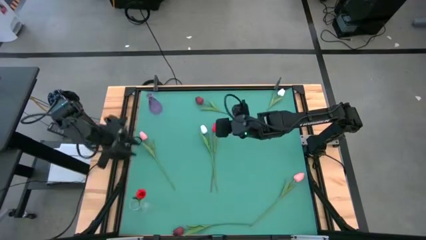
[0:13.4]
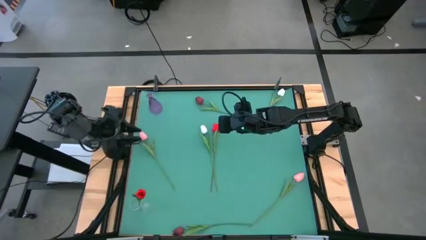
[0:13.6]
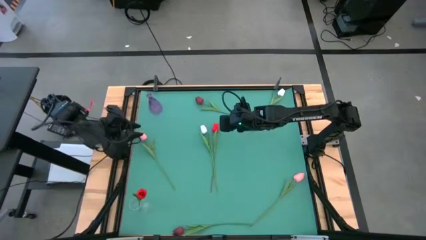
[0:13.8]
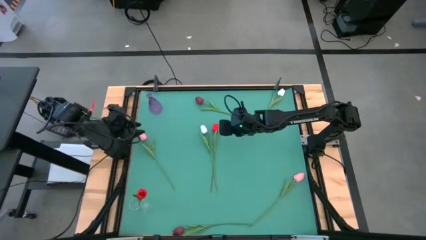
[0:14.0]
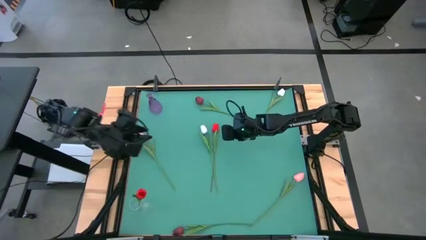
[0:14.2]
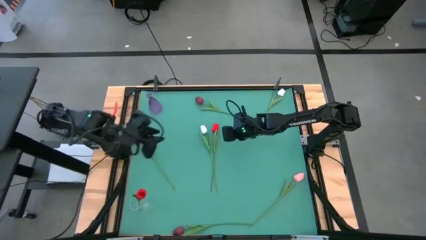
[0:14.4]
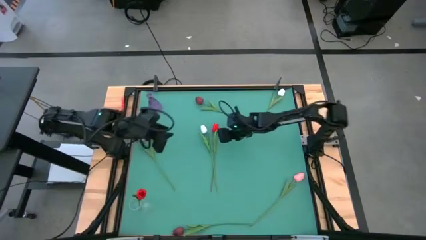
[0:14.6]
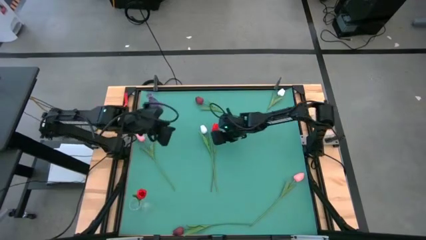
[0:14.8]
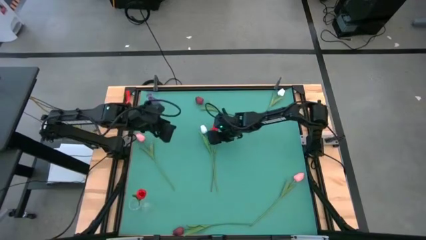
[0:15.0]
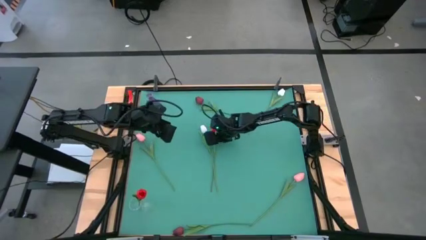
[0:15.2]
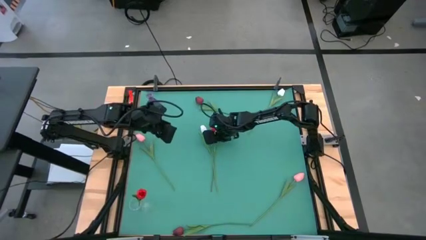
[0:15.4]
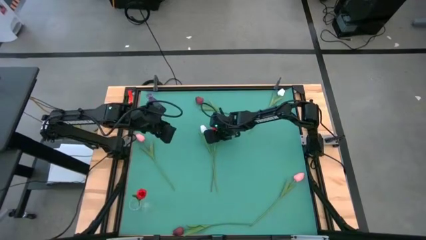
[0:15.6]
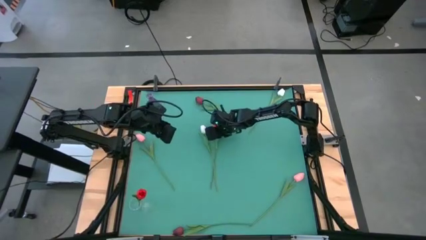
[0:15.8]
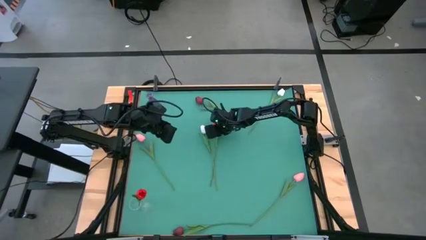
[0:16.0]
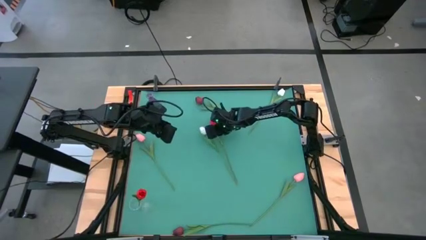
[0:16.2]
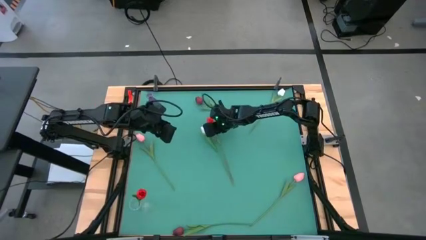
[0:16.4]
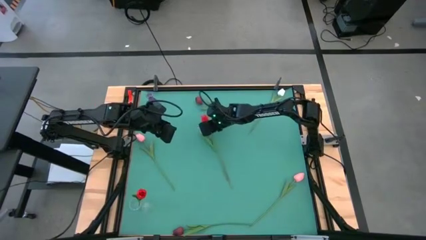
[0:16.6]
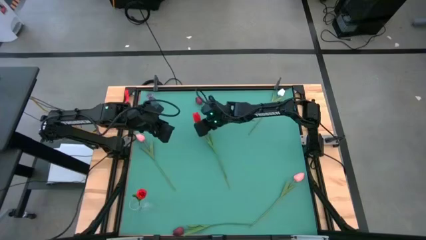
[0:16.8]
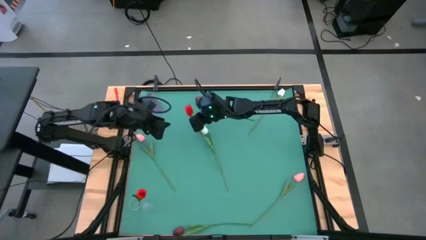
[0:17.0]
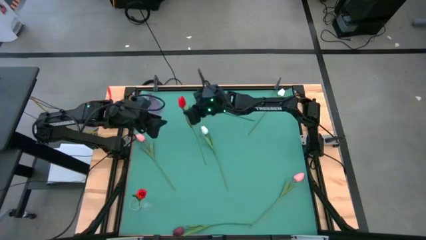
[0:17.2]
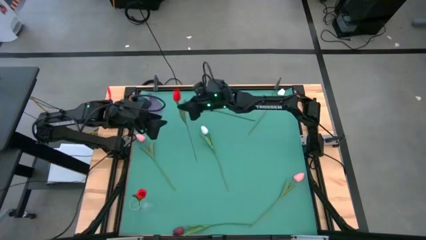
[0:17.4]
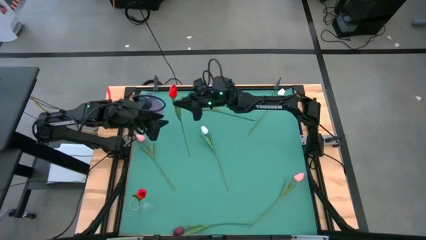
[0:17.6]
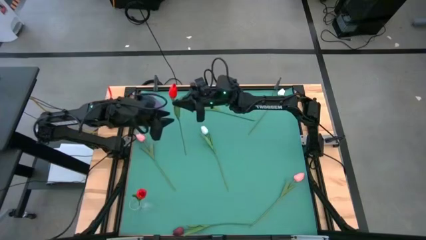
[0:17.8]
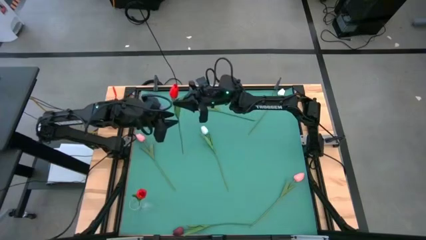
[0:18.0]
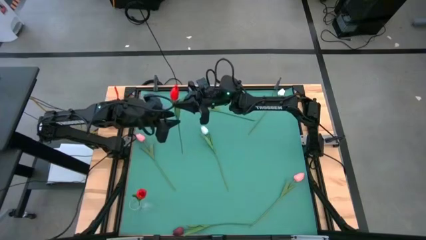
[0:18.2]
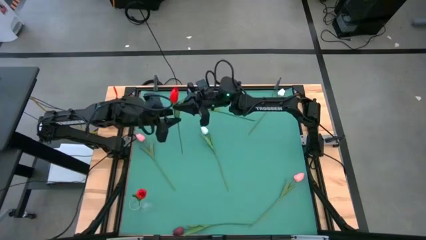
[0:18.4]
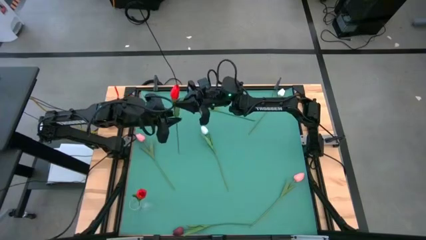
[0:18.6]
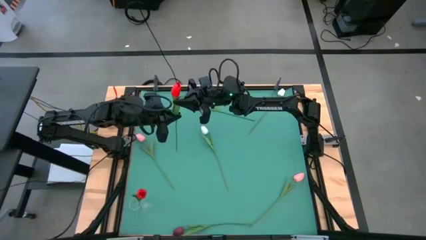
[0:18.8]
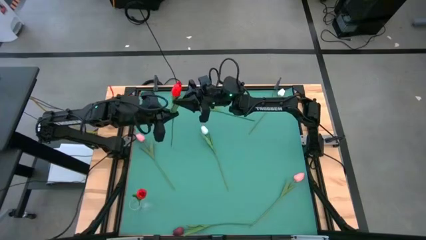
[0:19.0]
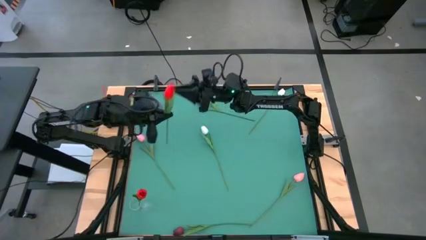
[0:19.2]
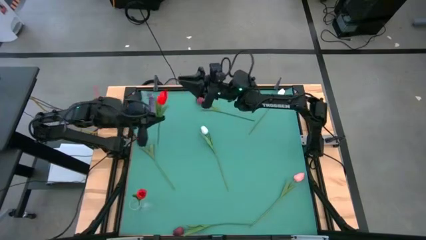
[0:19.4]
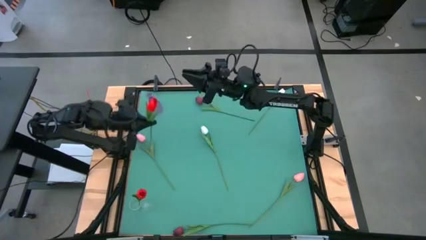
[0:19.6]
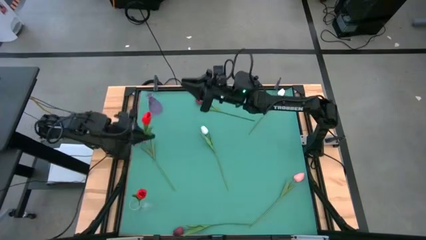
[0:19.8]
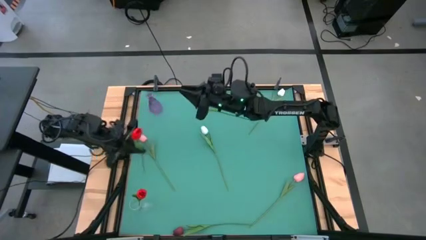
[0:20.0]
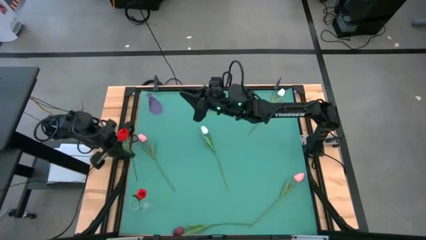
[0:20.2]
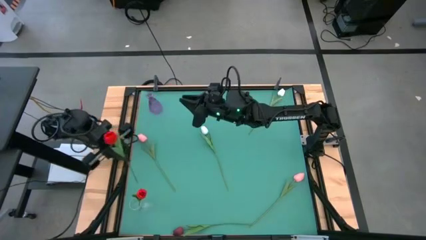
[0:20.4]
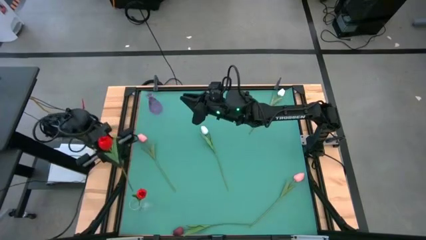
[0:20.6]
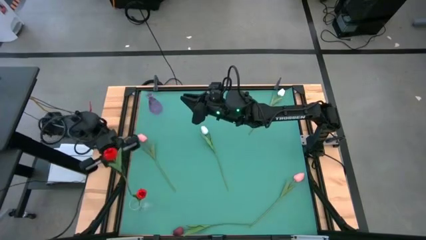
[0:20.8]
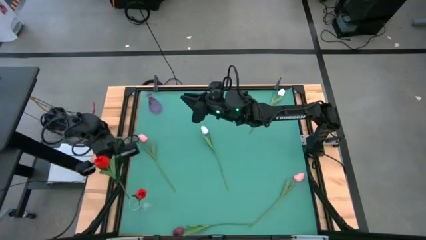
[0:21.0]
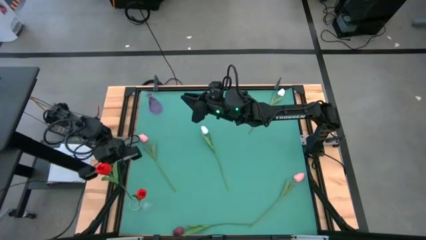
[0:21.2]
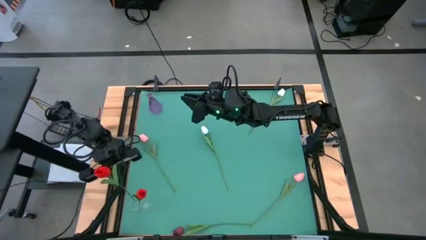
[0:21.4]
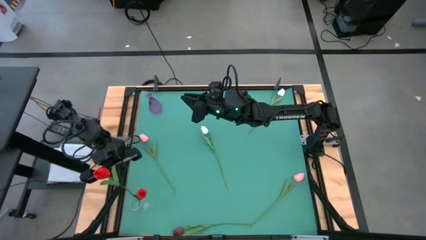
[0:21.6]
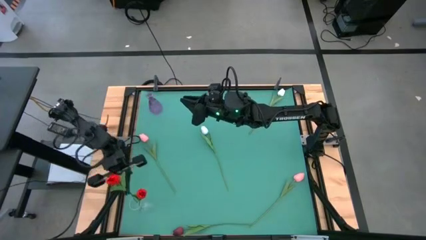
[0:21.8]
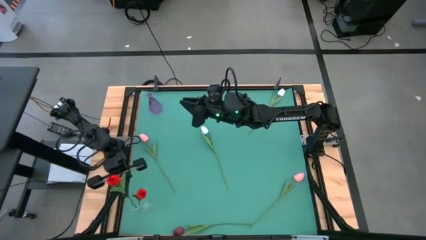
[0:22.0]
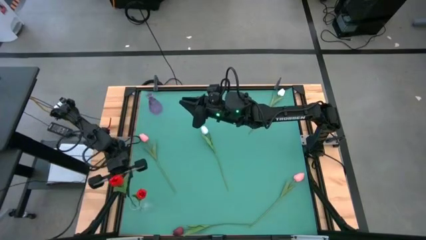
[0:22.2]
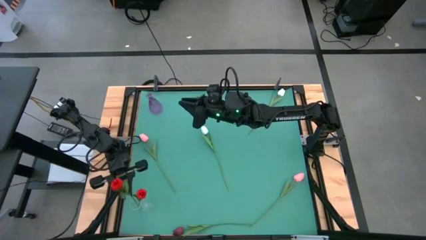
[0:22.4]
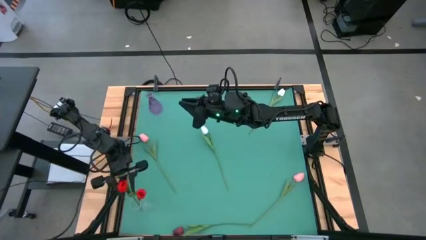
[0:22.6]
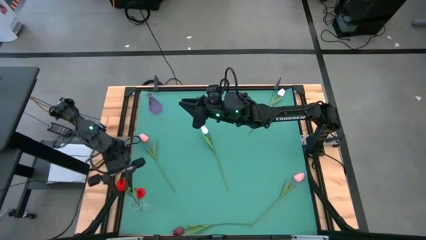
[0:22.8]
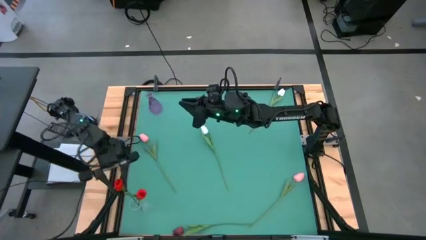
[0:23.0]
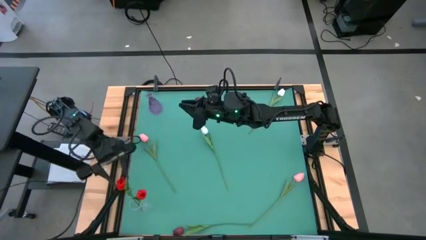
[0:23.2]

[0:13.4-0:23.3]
Task: Sort flowers into vase by color
Put the red flower into the transparent vase

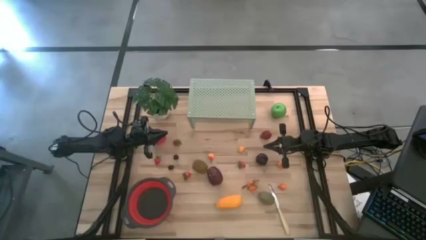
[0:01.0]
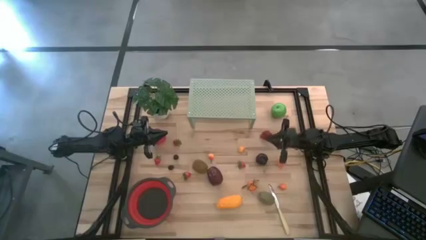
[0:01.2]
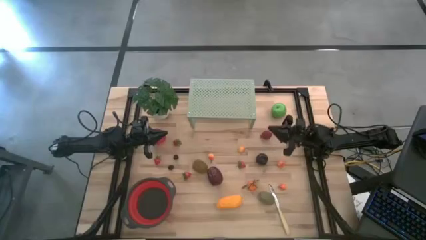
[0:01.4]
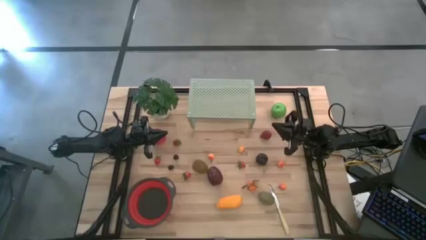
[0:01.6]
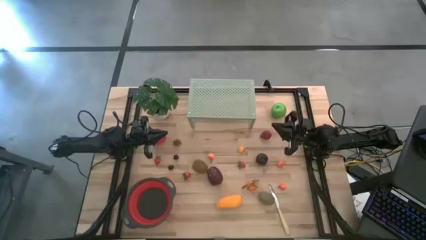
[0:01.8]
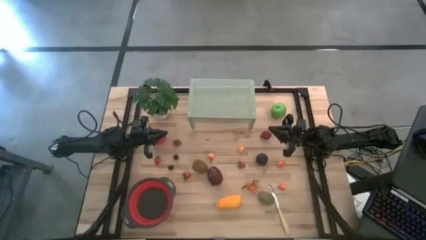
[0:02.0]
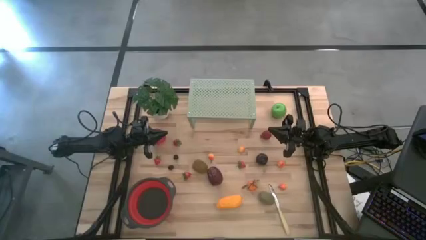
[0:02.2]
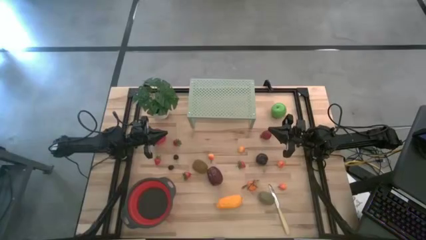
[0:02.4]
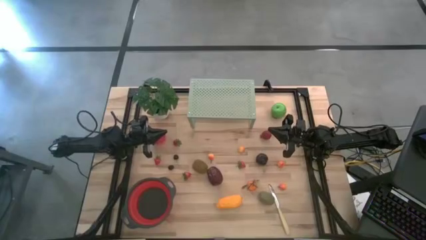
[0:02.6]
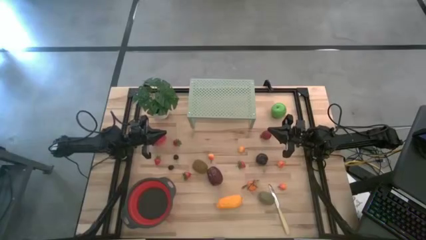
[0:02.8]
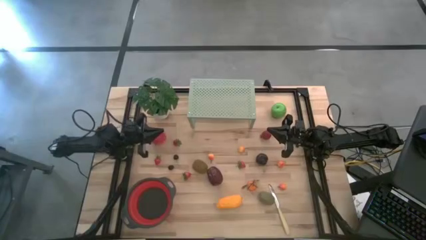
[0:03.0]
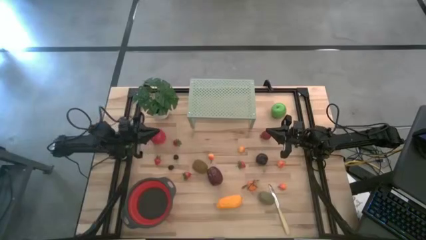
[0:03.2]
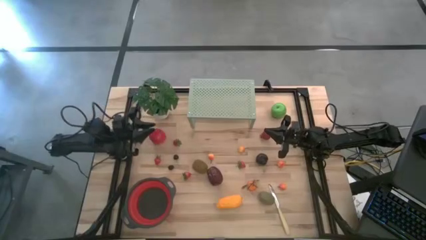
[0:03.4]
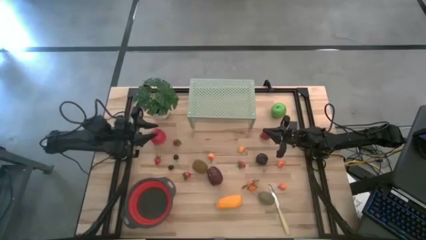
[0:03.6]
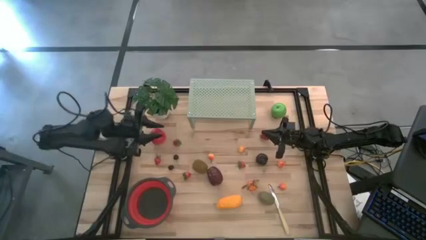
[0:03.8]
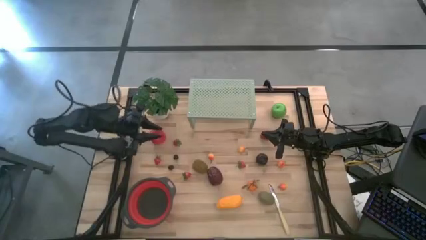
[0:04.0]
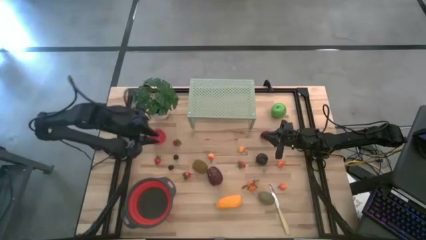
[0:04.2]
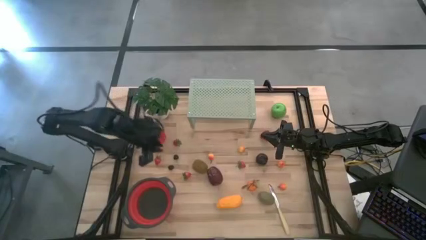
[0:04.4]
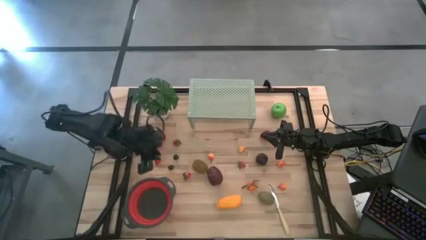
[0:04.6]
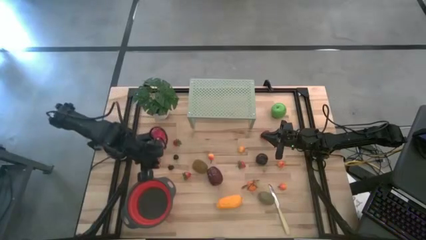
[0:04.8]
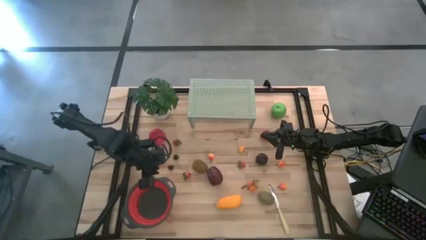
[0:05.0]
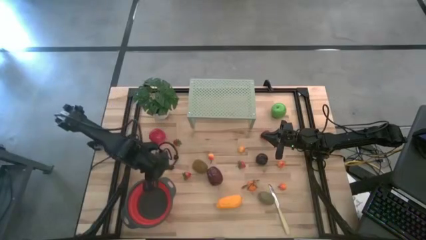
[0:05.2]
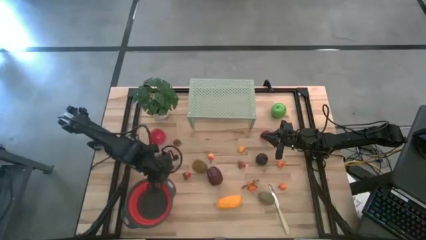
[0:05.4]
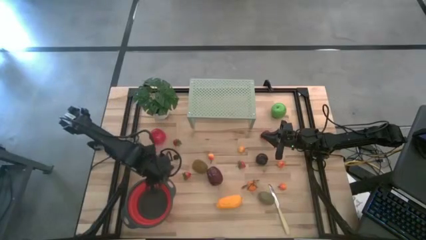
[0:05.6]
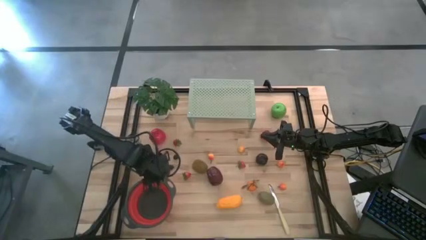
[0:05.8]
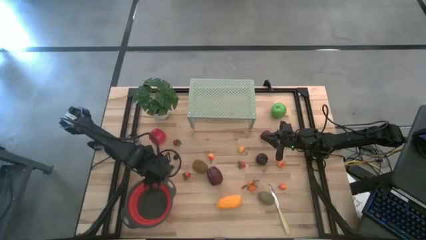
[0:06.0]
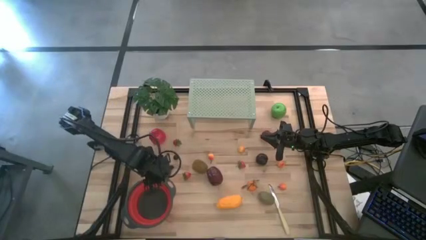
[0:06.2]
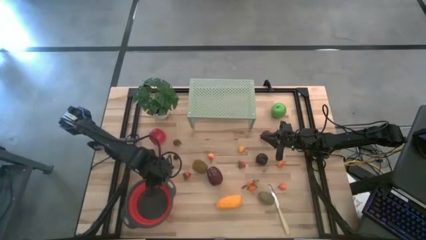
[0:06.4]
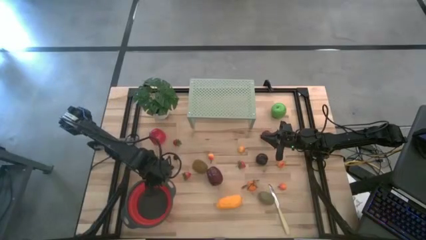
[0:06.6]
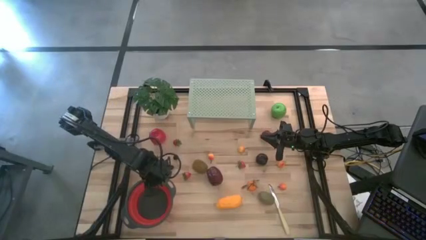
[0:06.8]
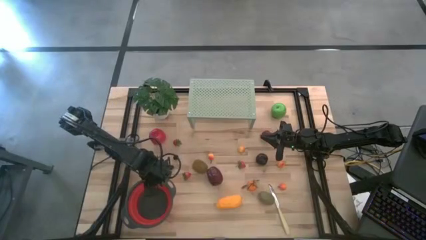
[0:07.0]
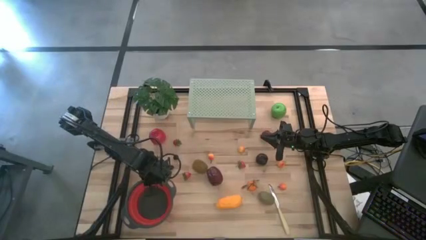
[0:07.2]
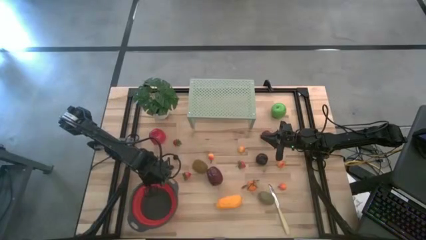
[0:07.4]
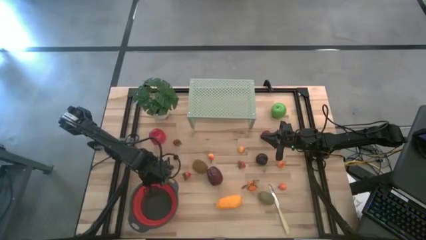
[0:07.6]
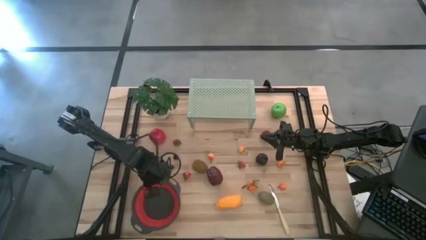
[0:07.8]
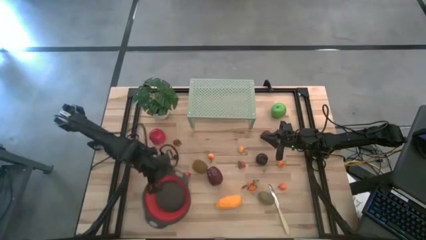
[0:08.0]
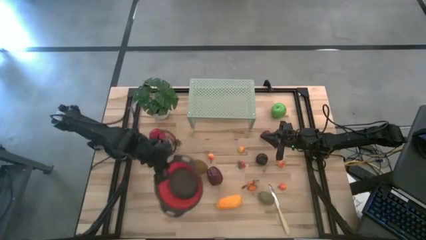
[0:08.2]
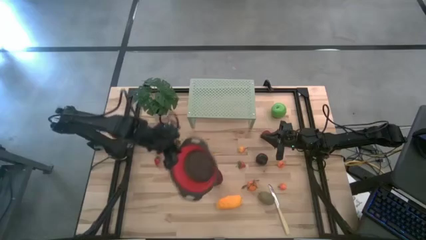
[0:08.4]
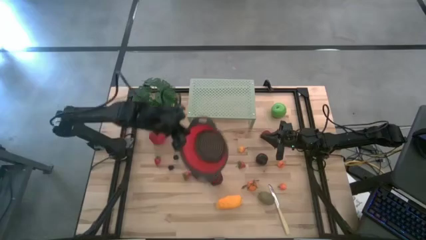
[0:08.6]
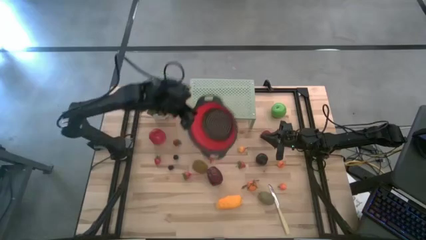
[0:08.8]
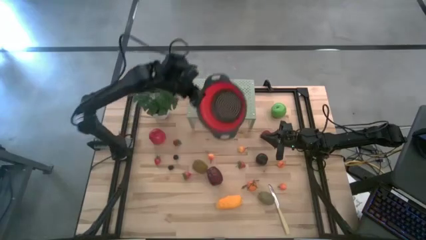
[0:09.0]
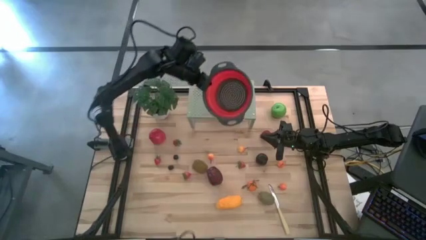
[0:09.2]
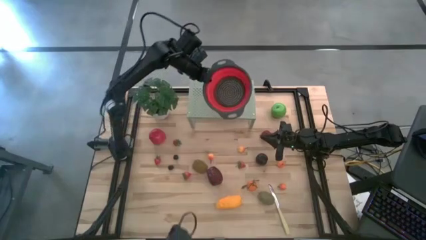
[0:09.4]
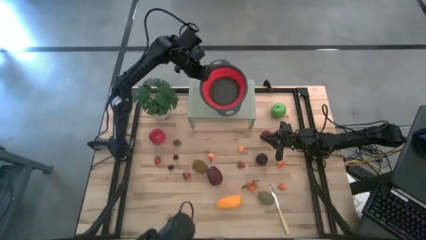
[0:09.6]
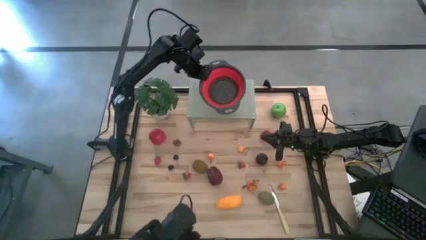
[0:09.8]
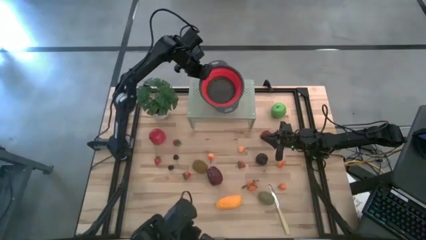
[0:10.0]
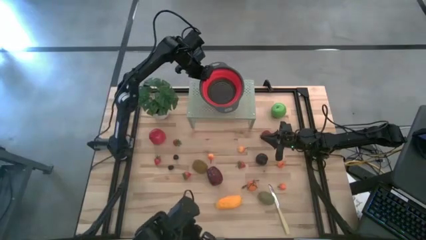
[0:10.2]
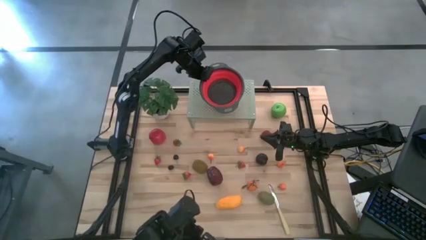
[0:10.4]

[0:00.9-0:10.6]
Task: Pick & Place Fruit
Put the red strainer bowl on the shelf
